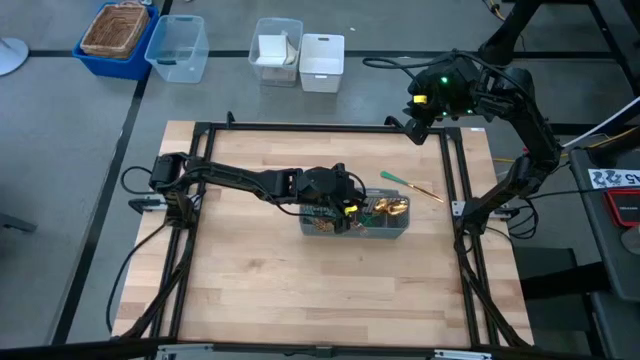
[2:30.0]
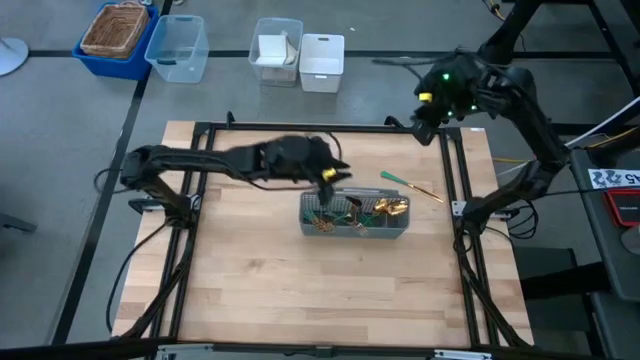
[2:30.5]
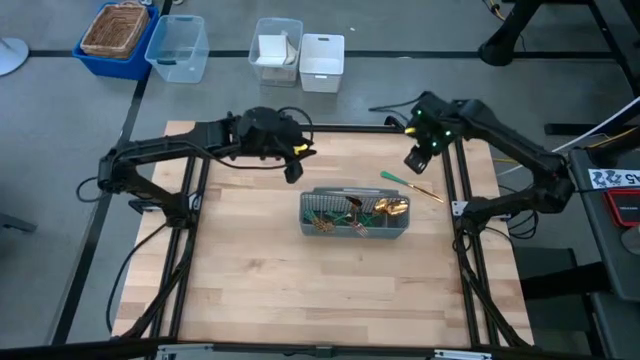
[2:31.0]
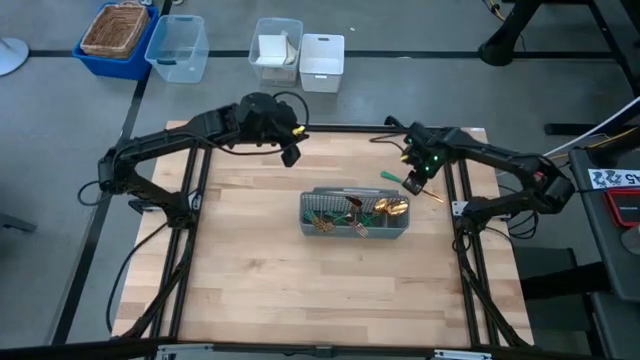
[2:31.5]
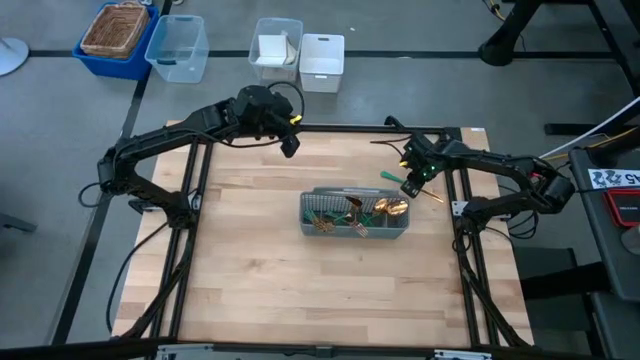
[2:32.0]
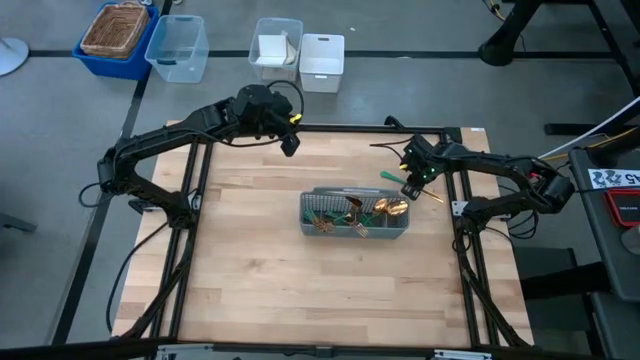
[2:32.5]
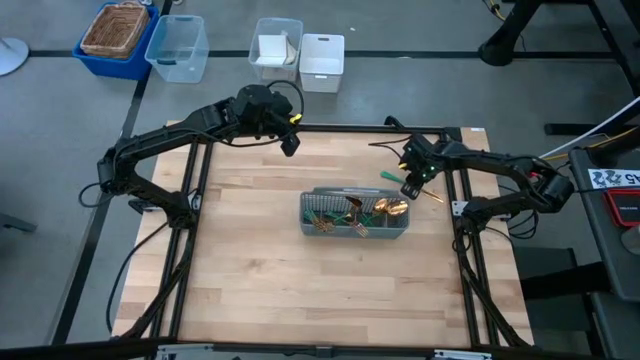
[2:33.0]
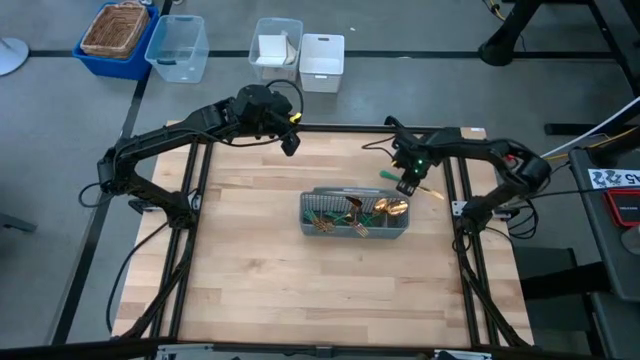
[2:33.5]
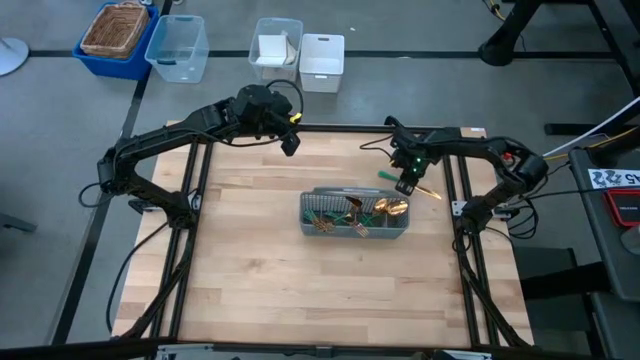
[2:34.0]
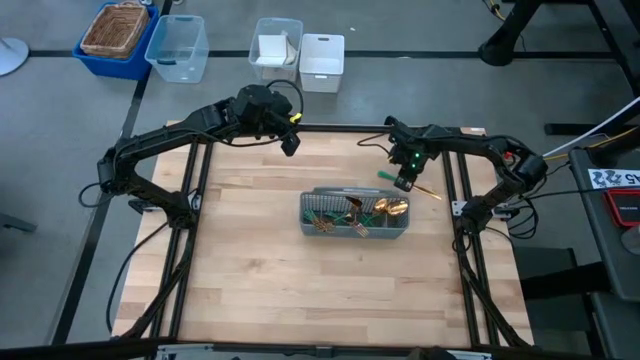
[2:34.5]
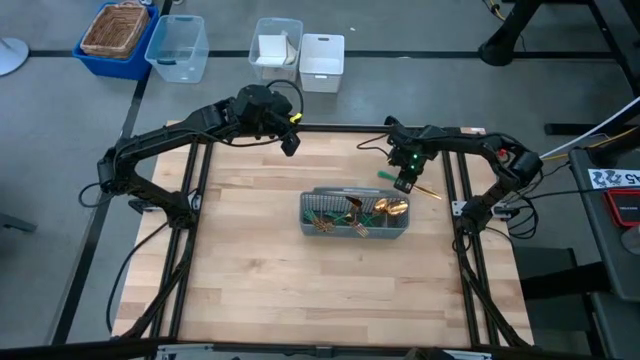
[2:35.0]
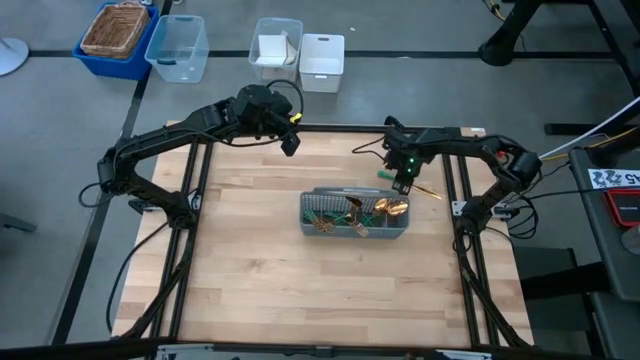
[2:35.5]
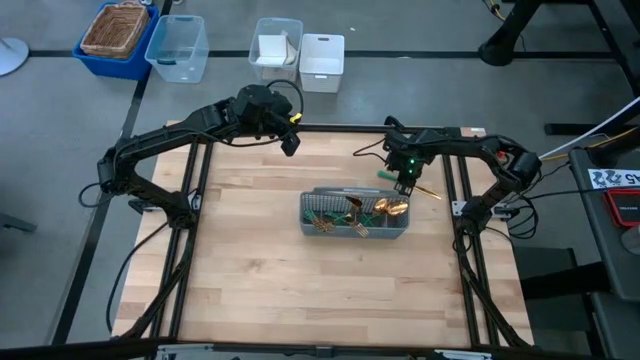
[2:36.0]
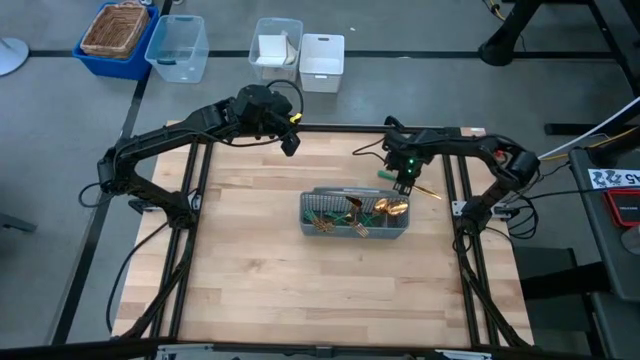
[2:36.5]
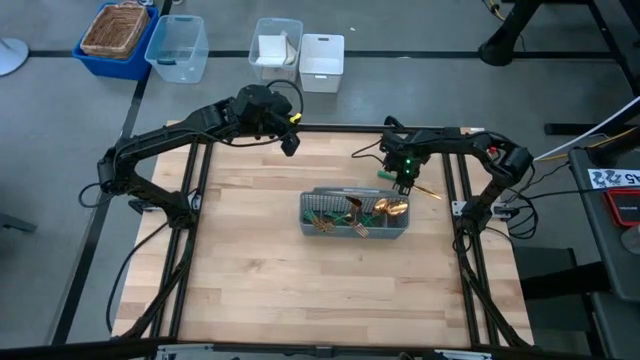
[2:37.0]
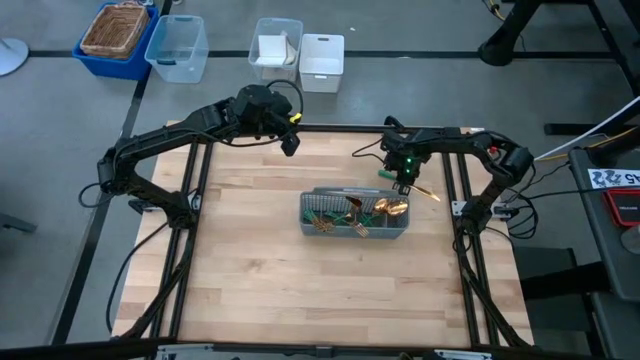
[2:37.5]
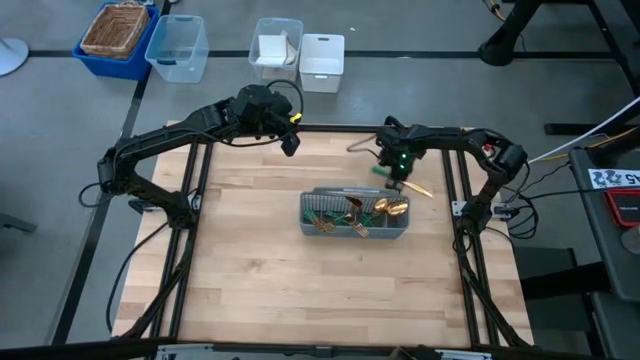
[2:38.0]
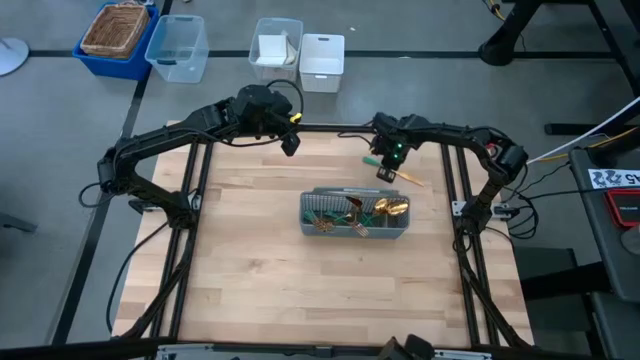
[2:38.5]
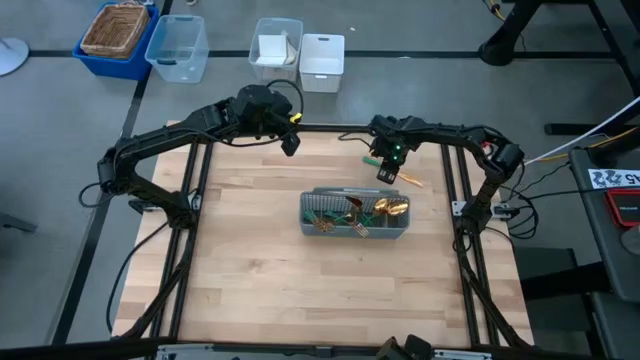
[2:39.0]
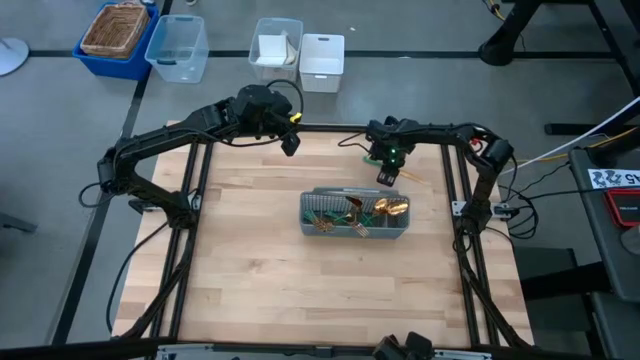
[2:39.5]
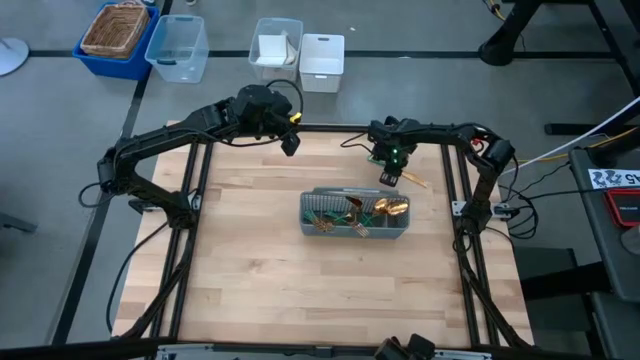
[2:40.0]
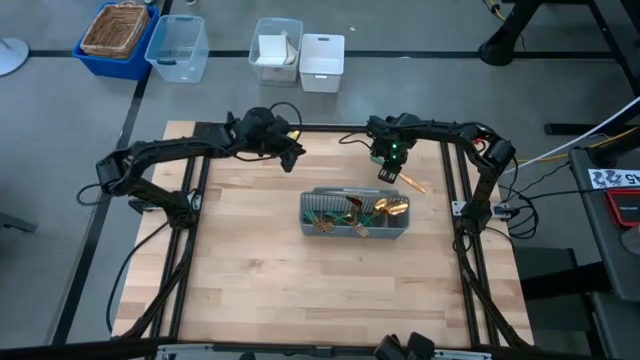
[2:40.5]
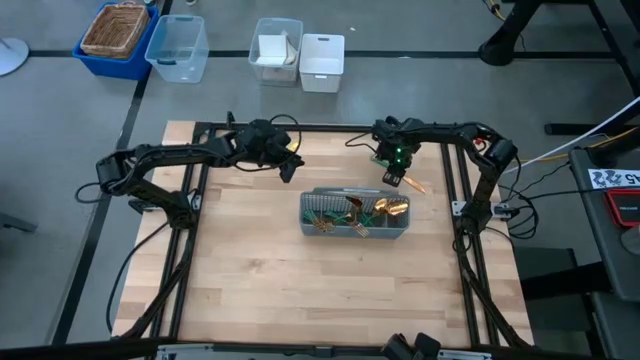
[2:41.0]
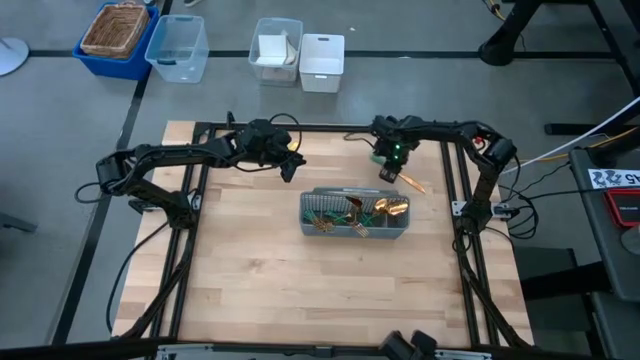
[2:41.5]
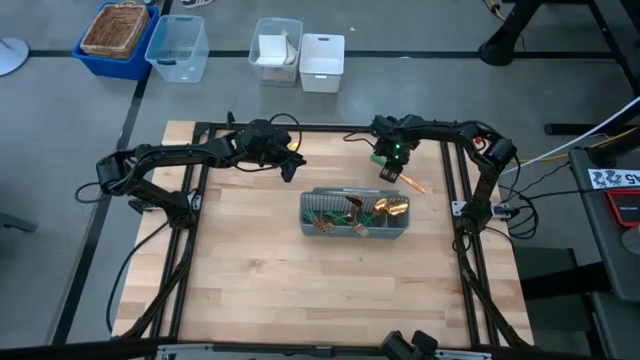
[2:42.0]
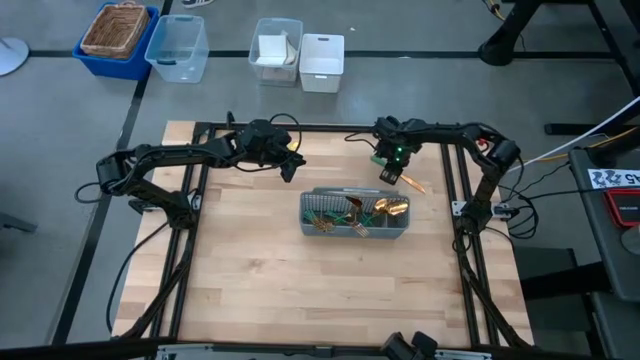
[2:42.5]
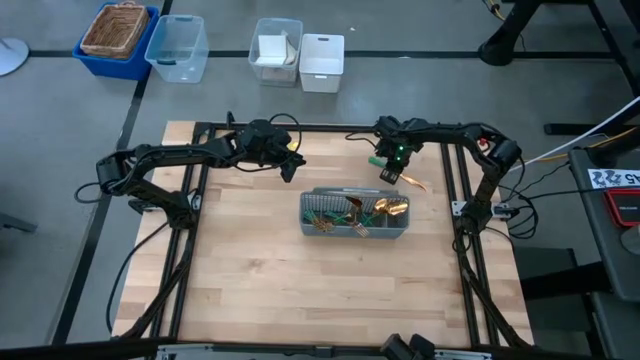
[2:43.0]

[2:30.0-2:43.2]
Task: Sort silverware
Put the green knife into the gray utensil holder

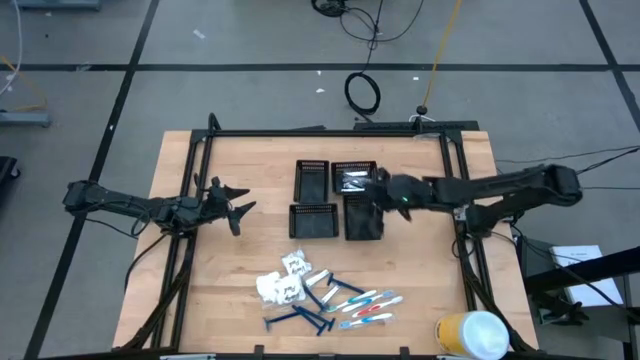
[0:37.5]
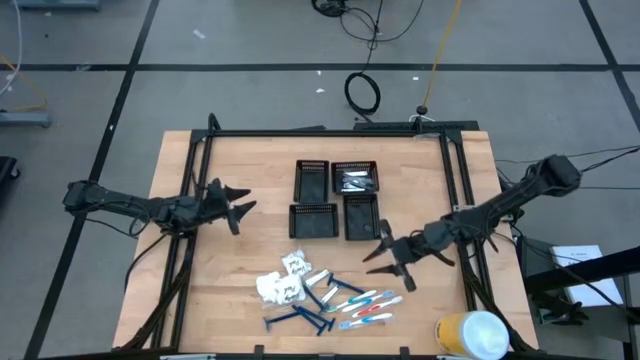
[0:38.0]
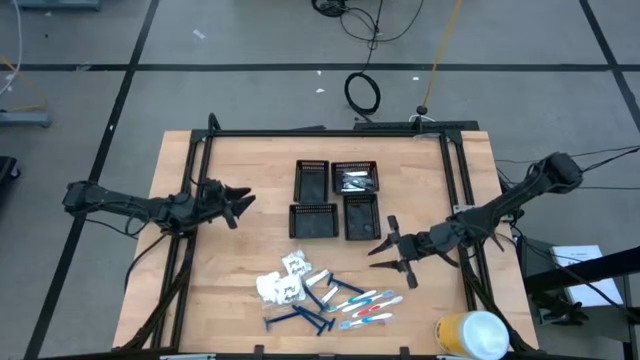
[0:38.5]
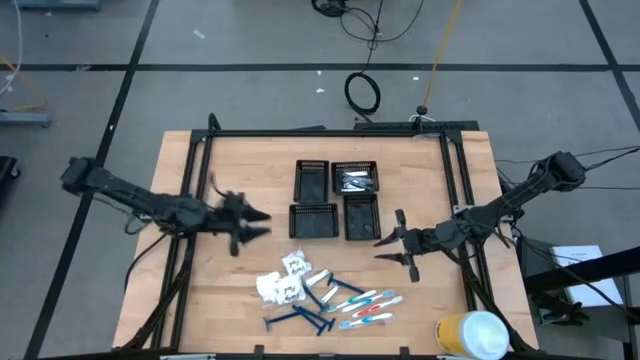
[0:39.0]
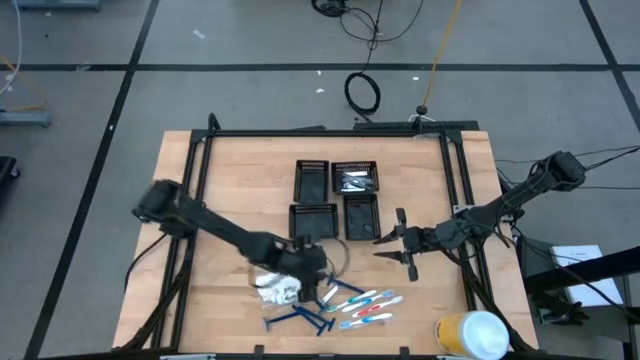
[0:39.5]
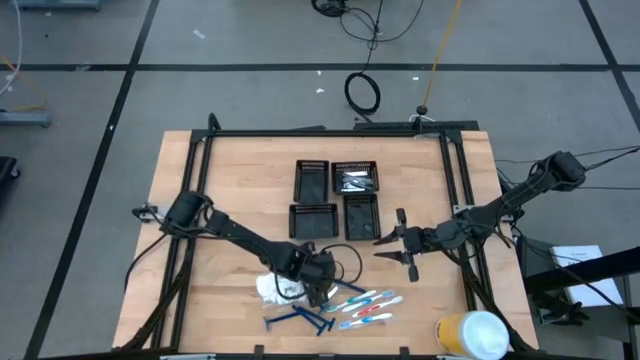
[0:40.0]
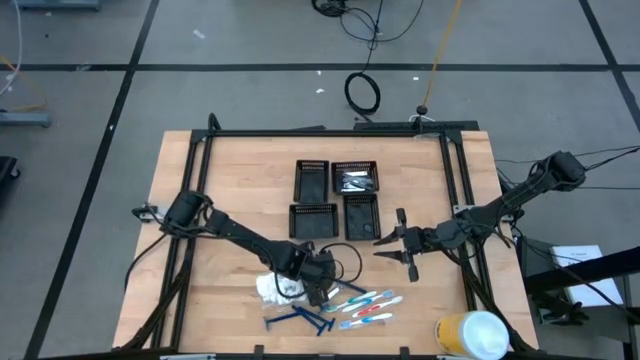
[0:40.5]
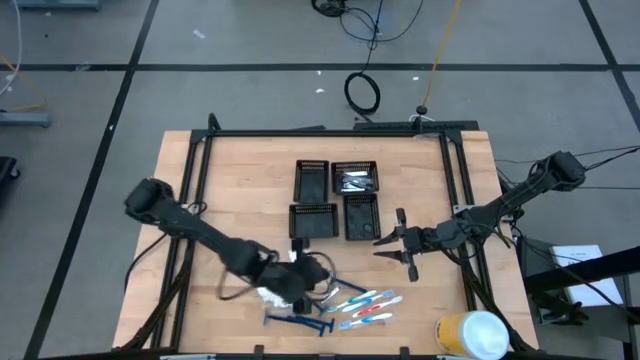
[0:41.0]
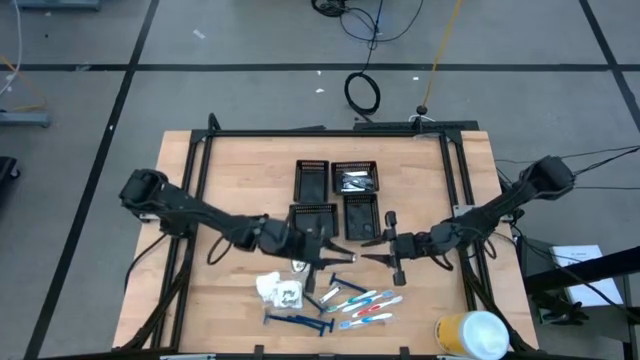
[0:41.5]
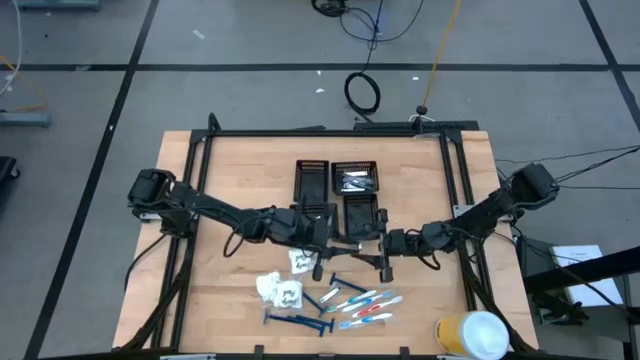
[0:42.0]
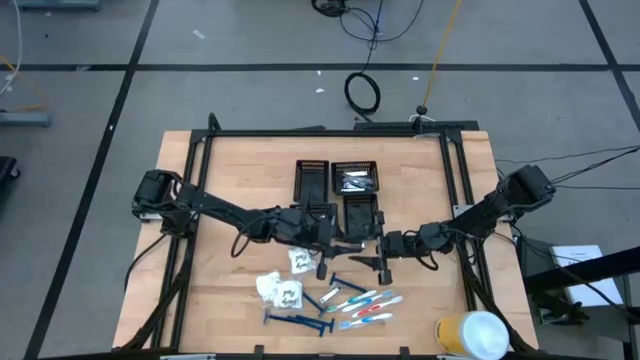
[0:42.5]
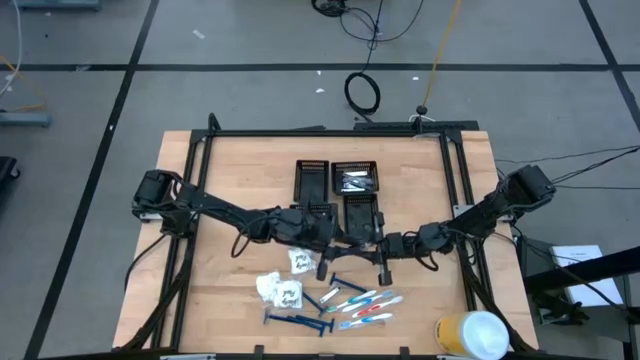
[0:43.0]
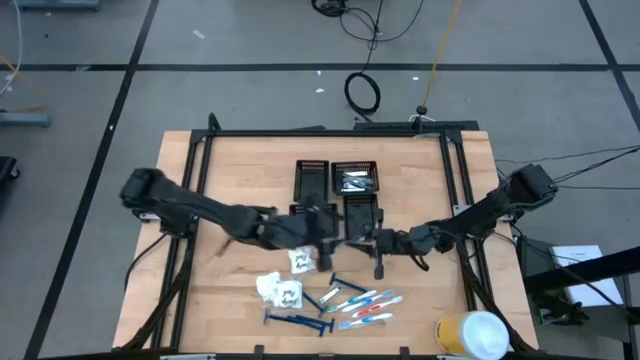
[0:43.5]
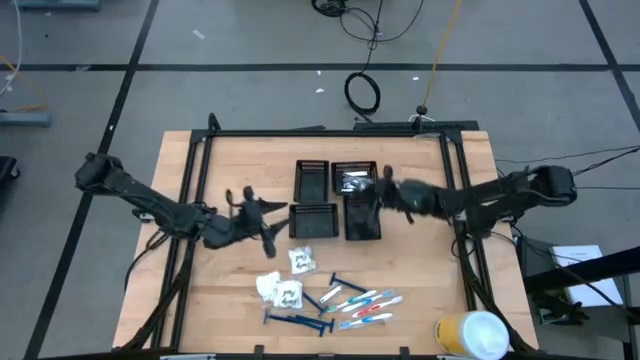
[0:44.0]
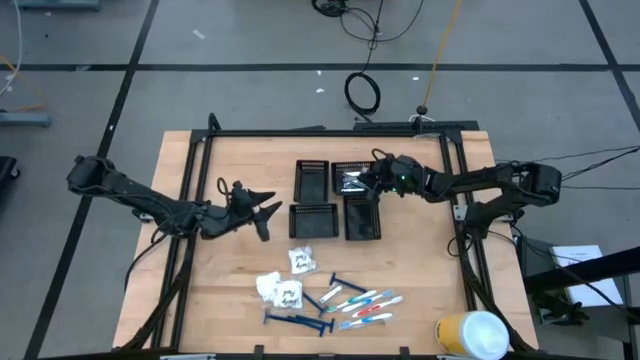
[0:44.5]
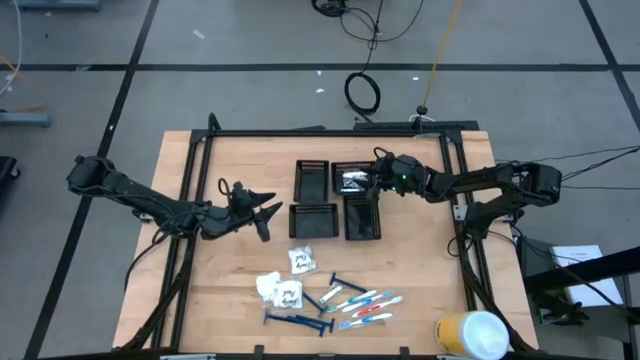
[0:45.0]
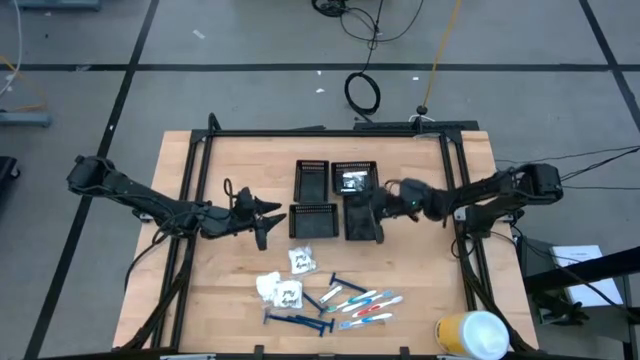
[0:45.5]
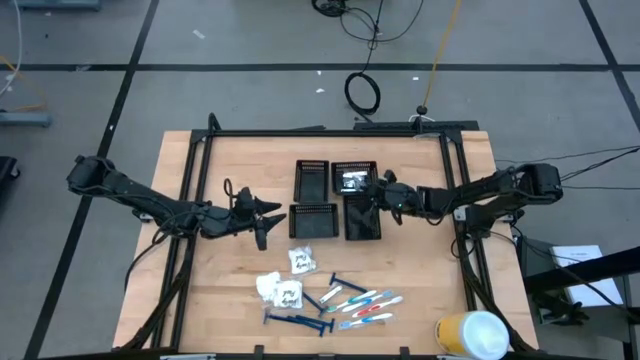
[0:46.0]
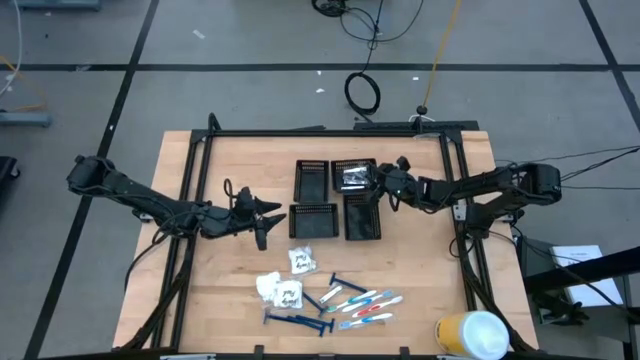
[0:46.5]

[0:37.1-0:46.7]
Task: Pick & Place Travel size toiletries
Put the silver nail cutter into the top right black bin
